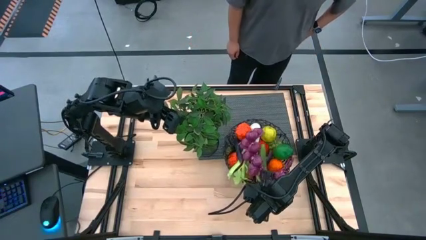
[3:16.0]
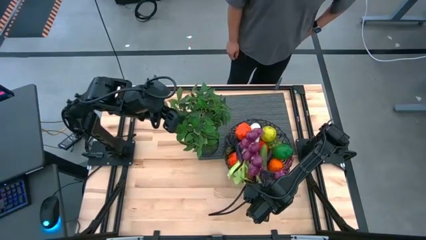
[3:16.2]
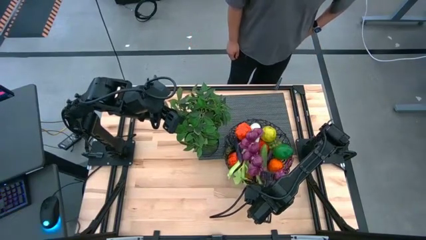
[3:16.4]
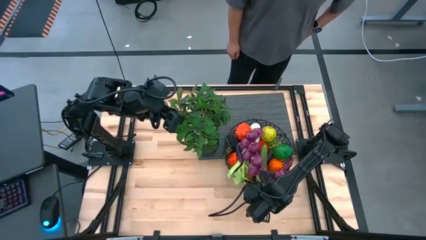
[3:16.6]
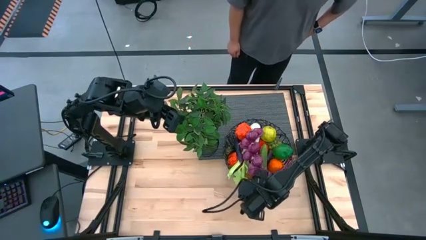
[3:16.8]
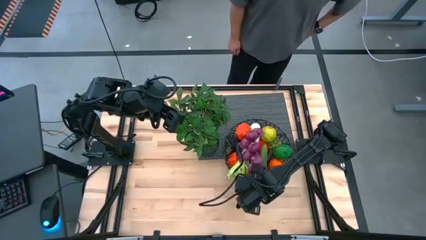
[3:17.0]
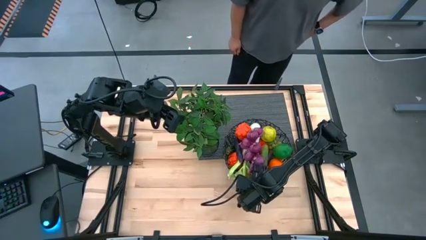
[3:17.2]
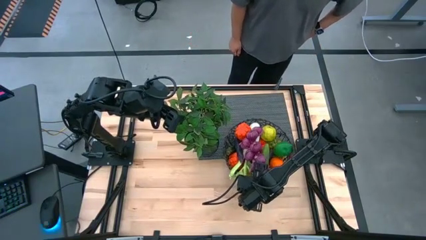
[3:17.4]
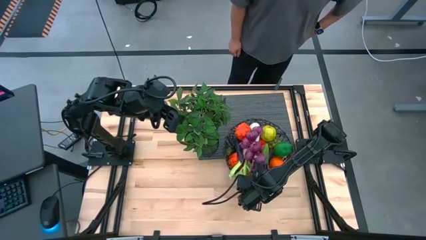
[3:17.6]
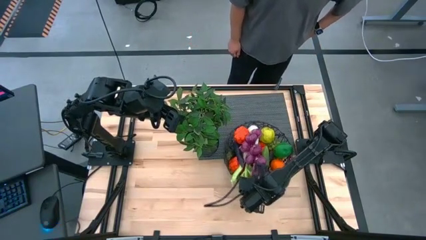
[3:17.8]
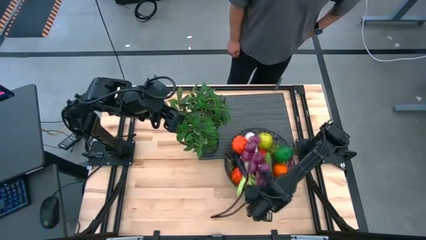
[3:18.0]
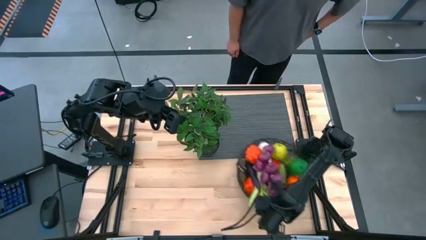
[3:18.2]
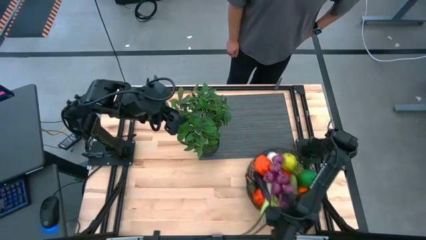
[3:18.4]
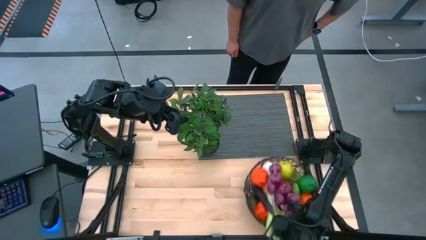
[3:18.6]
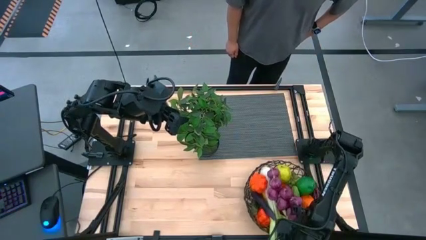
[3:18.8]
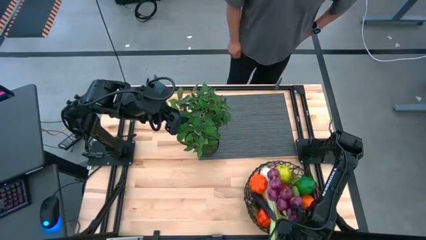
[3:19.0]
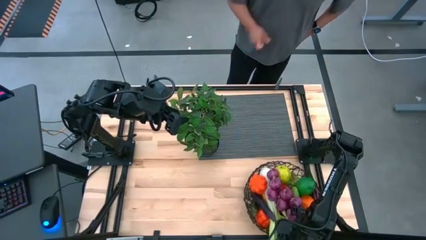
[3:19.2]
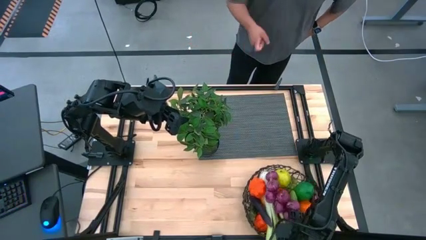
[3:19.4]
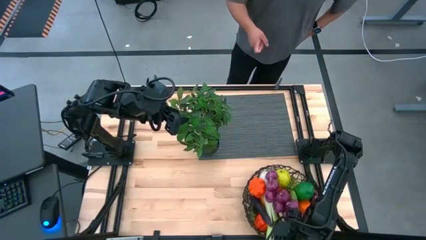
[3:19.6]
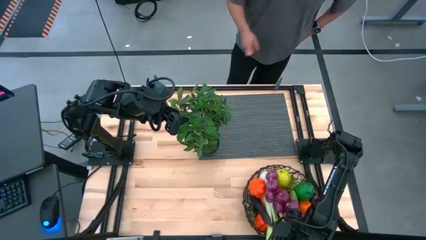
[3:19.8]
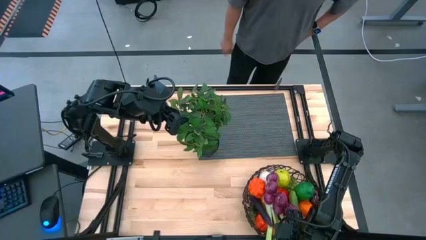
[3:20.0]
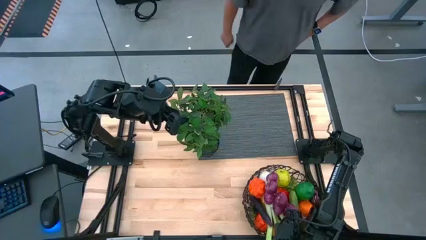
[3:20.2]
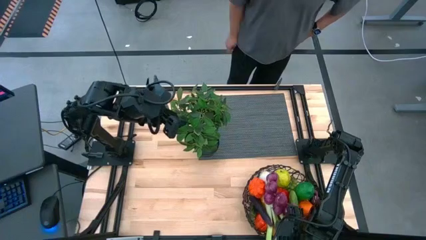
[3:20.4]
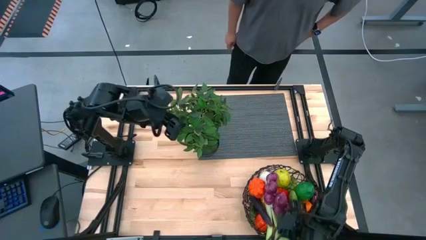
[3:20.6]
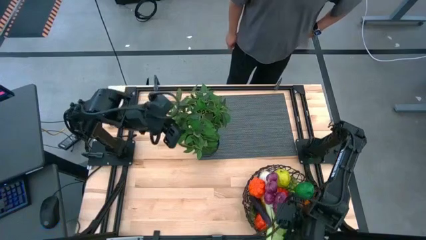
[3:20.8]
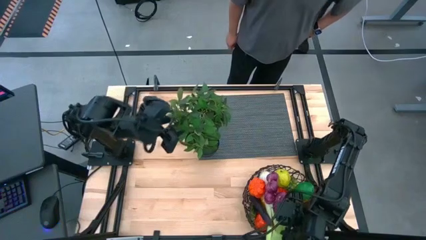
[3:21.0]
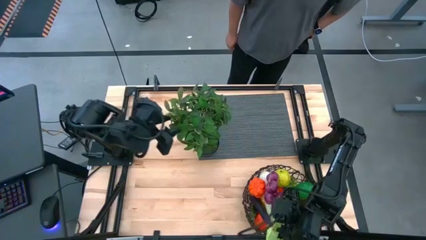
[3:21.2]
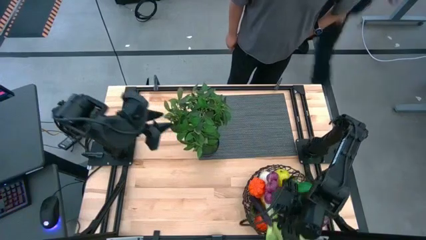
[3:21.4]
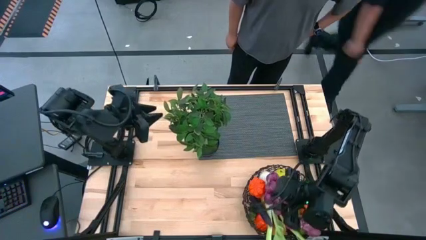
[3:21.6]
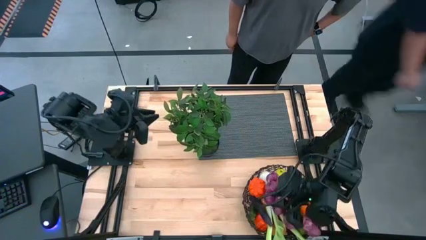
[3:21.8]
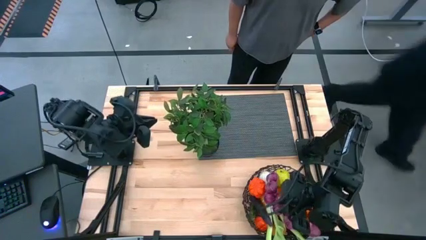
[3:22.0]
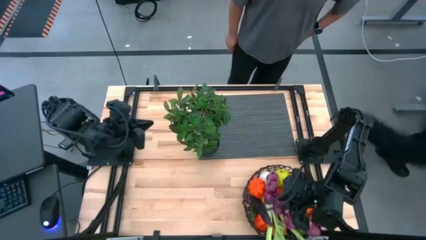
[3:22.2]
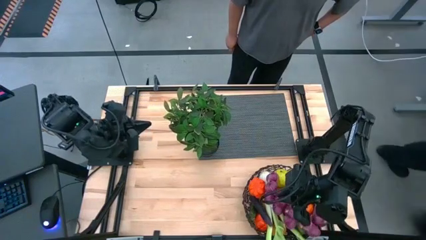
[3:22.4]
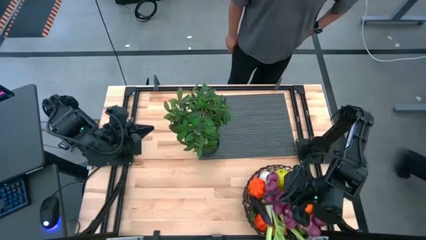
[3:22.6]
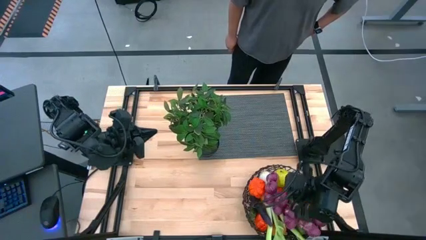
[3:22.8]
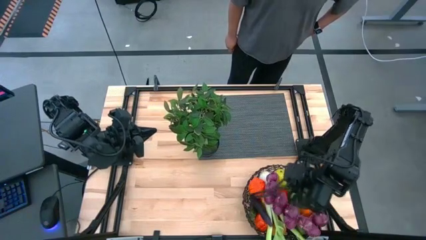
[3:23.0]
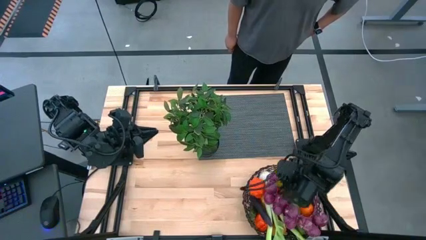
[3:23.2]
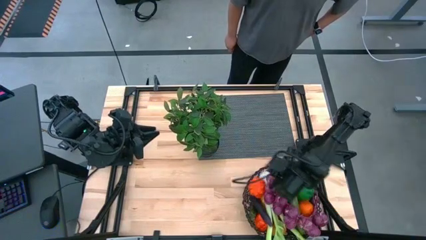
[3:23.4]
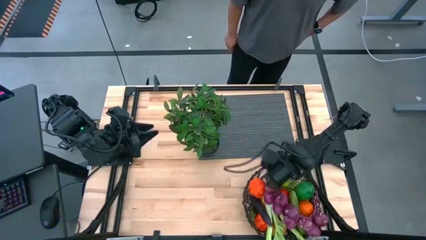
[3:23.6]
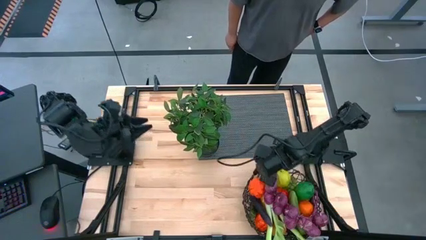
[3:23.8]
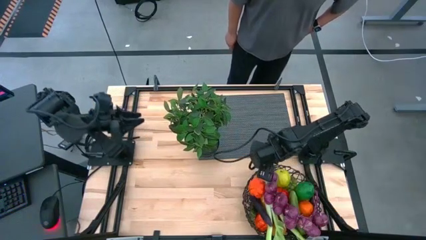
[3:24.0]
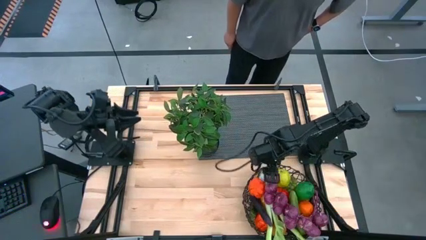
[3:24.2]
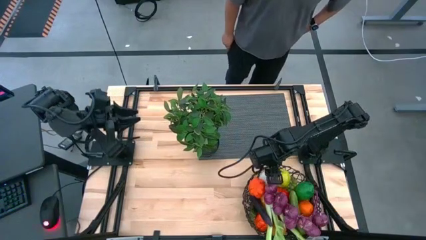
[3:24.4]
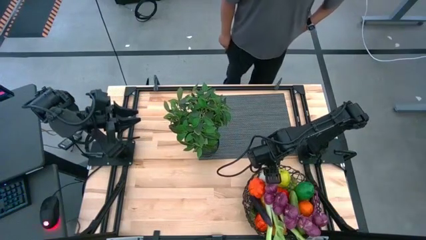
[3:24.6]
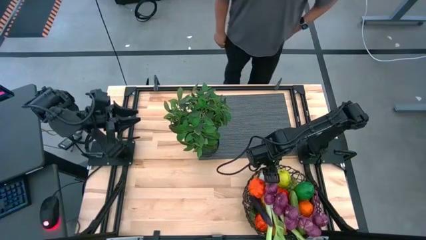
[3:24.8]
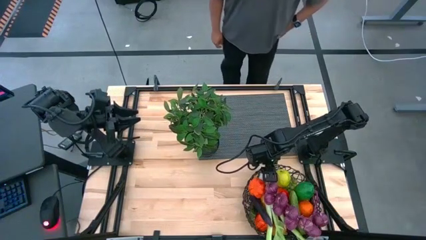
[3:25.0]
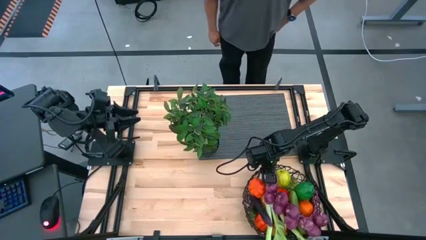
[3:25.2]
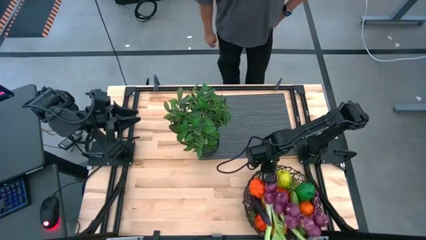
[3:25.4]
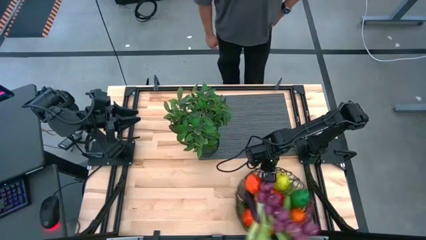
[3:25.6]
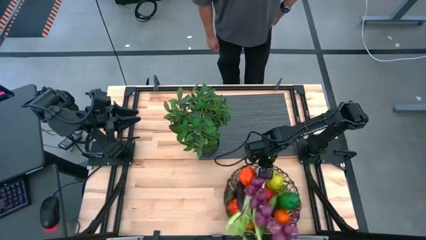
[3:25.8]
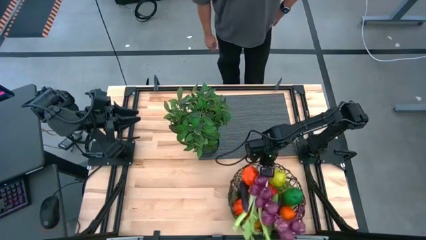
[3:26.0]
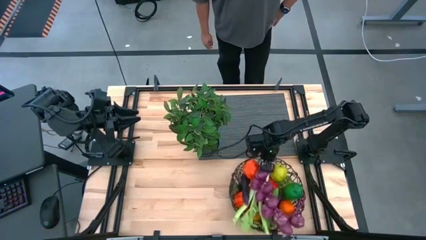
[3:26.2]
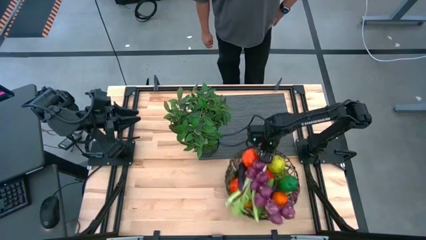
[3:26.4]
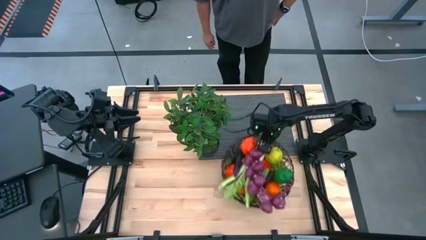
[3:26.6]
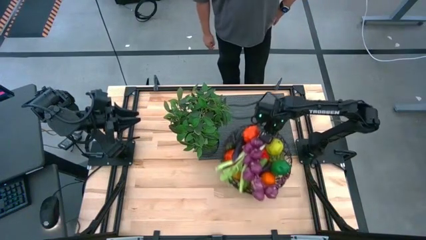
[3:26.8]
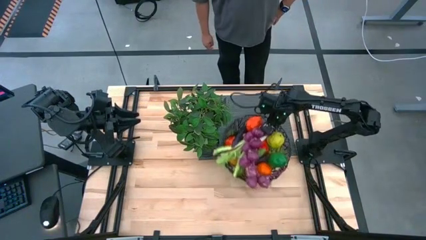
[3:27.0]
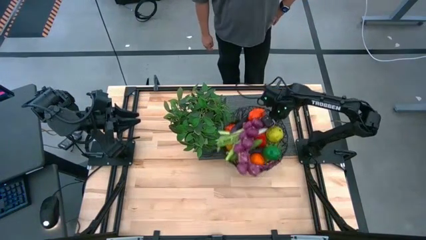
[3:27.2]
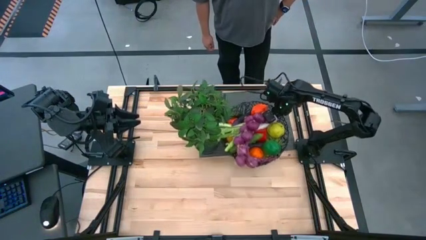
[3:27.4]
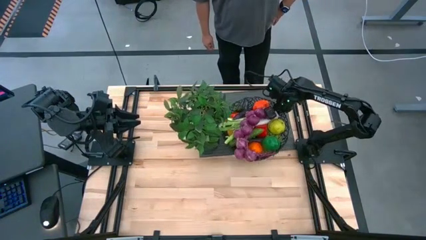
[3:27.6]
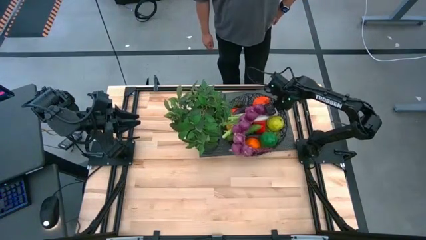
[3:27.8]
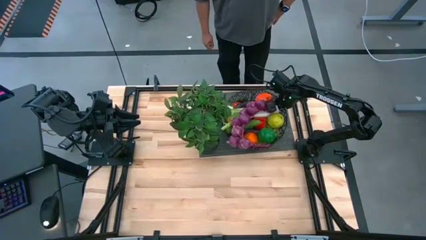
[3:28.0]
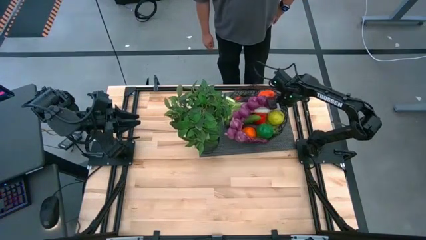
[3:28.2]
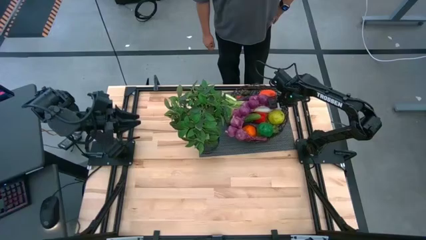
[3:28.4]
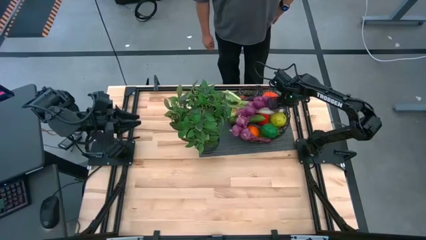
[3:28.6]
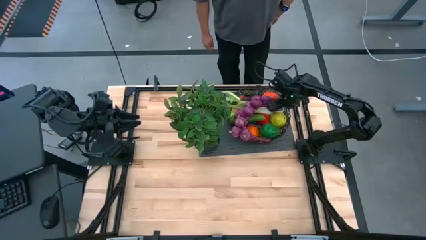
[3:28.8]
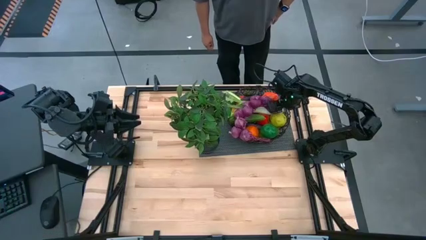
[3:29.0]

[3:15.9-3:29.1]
Task: Build produce basket
Move the brown wire basket to the top right corner of the table

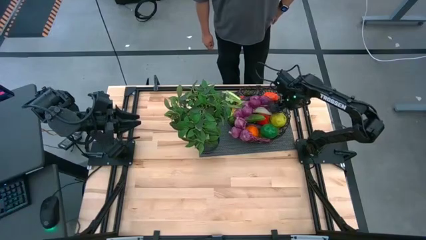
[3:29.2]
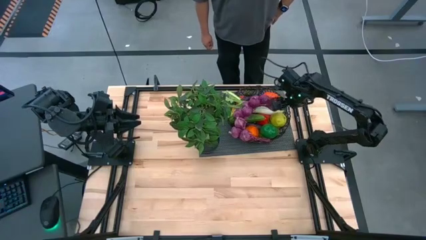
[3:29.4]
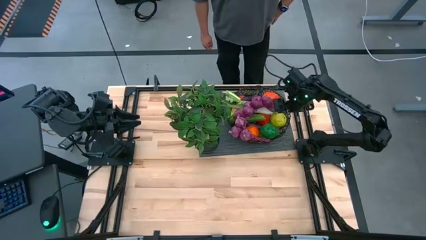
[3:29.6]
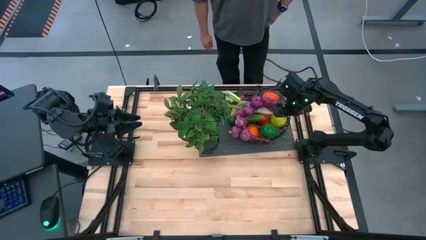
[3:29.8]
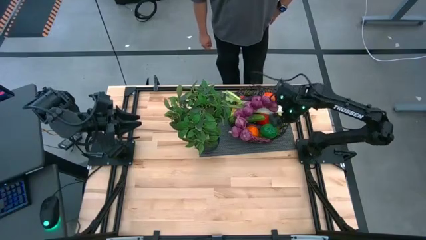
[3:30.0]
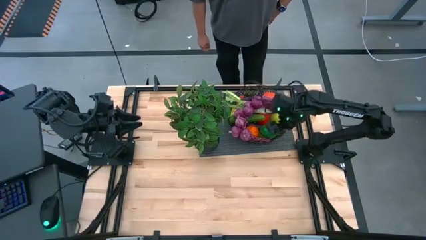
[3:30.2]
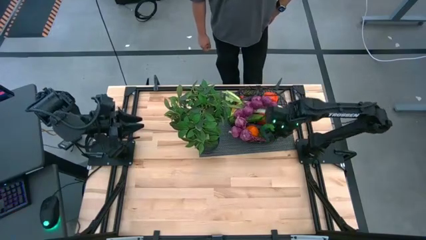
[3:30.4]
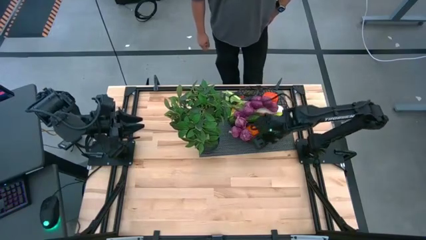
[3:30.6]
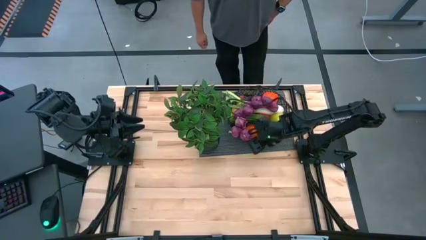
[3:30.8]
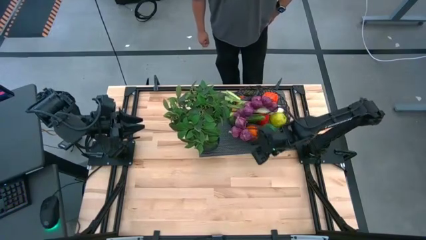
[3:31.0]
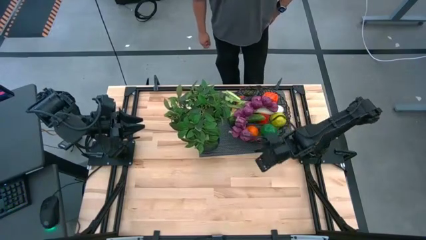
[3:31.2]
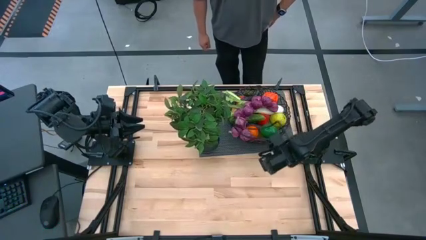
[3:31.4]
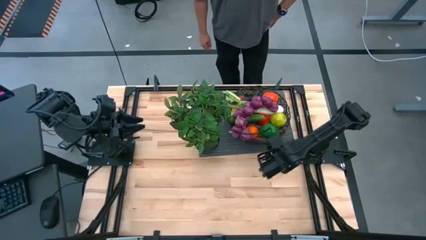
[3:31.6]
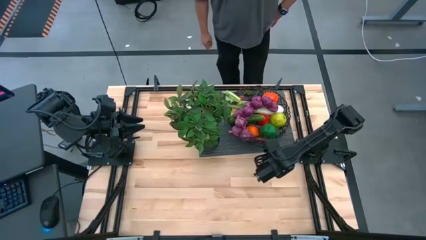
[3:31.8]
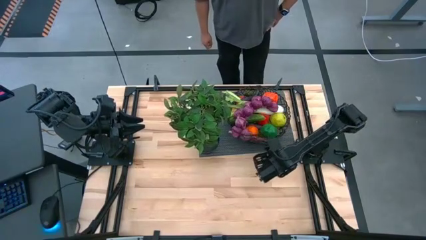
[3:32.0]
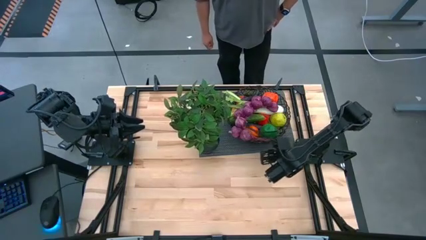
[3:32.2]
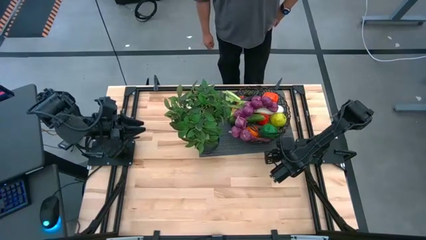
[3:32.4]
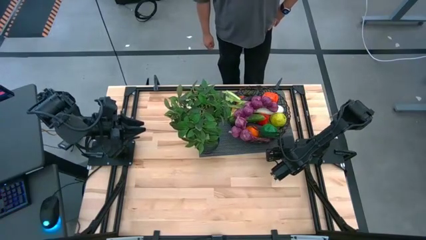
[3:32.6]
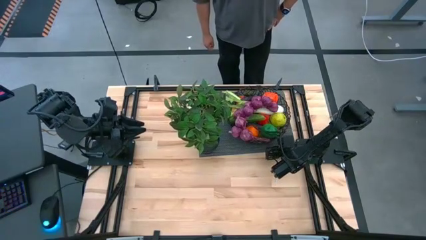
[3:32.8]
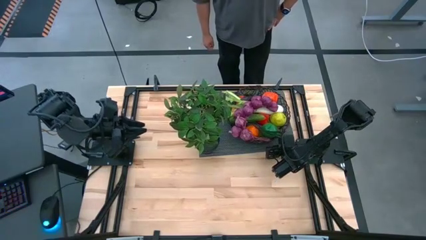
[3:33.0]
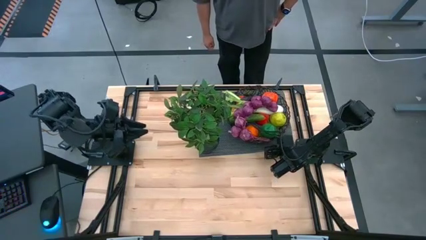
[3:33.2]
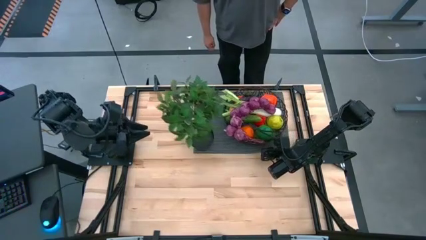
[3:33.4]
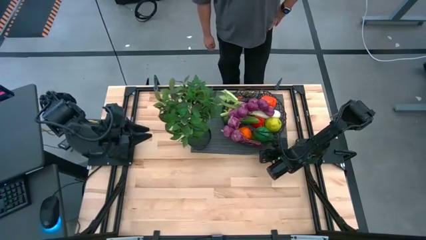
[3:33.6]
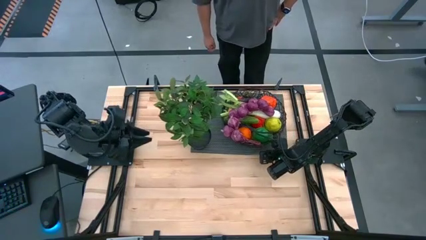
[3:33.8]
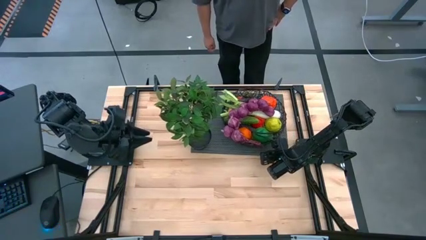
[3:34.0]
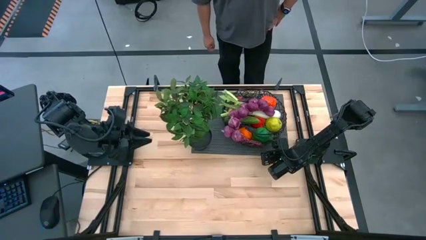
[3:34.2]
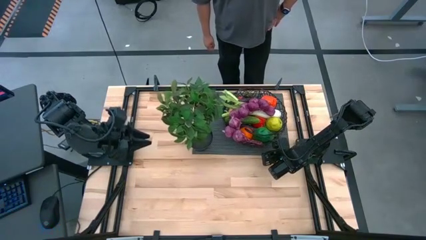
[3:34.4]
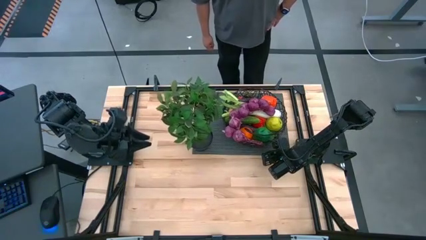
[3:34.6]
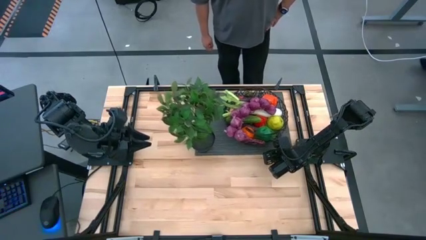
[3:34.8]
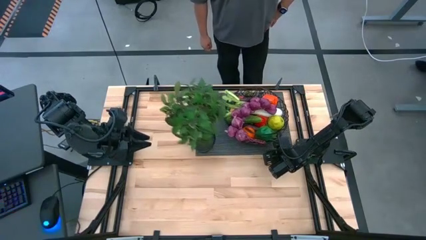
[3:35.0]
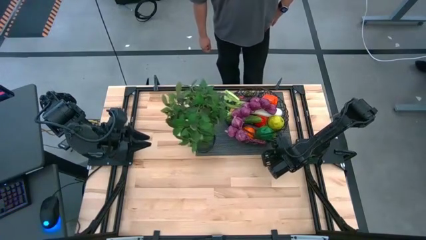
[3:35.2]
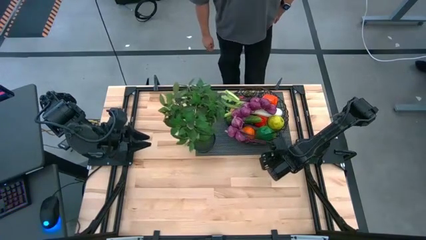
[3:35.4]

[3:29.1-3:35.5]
Adjust the gray mat on the table
